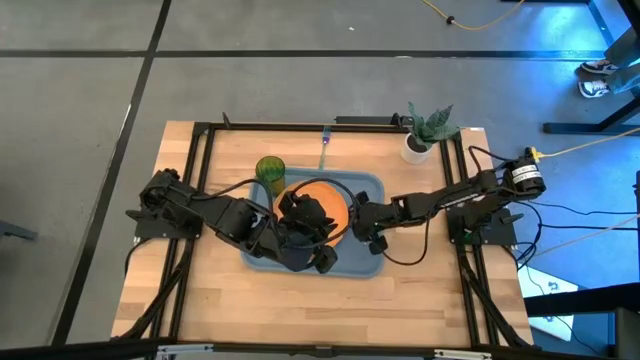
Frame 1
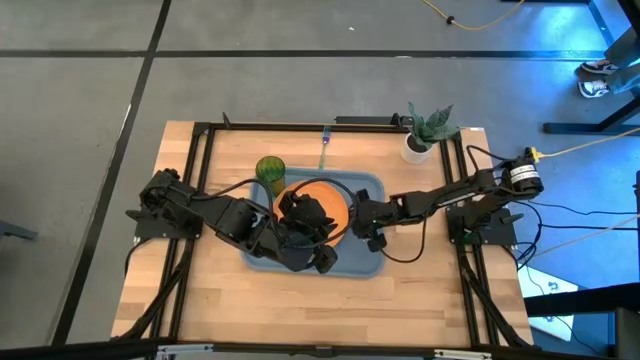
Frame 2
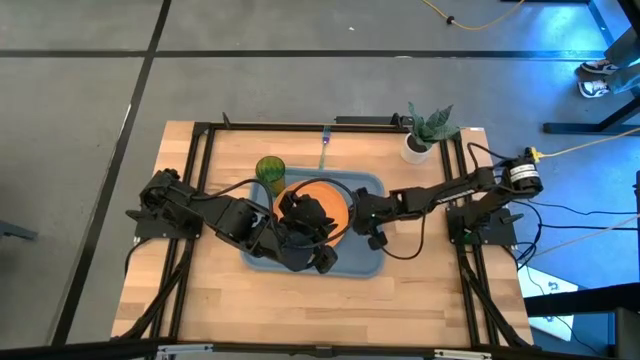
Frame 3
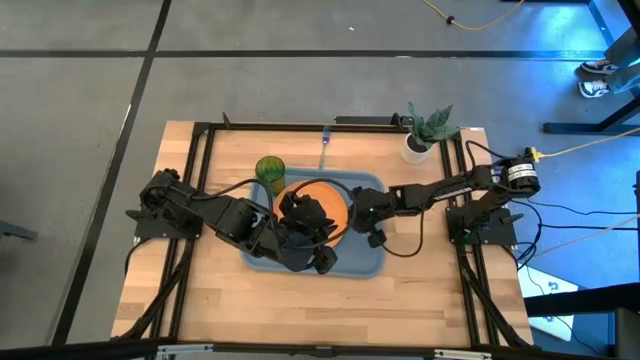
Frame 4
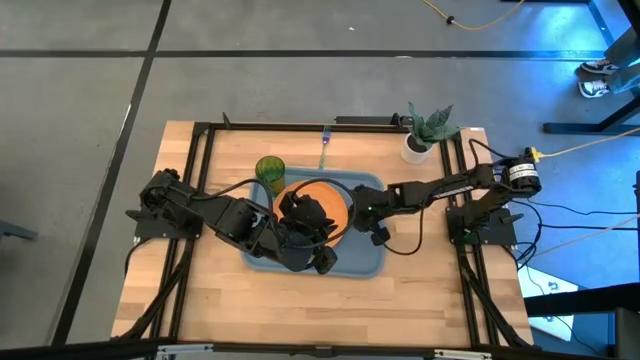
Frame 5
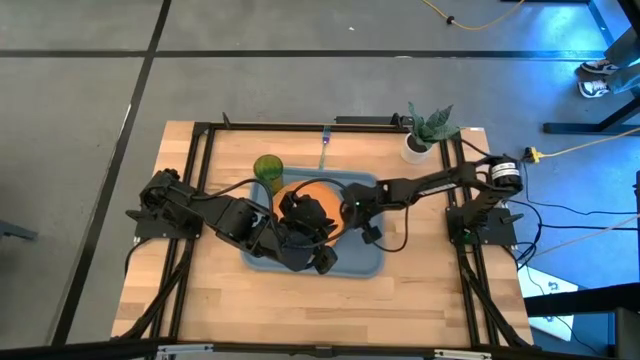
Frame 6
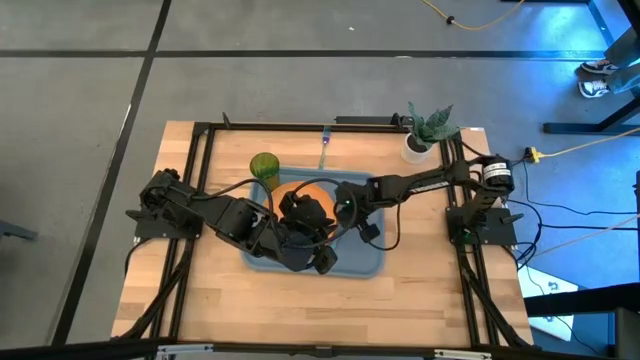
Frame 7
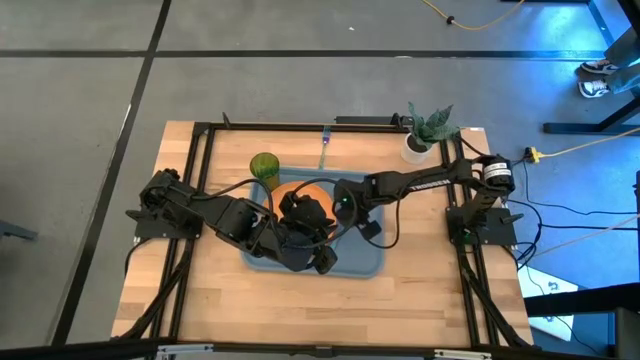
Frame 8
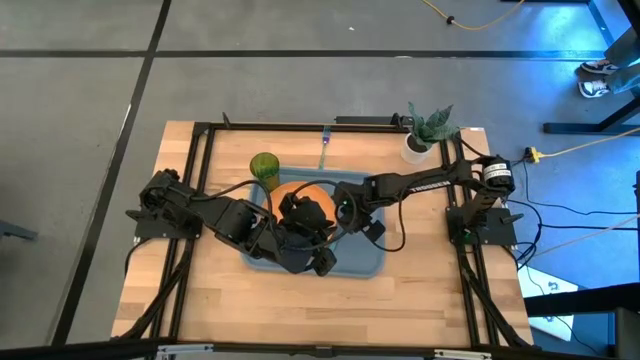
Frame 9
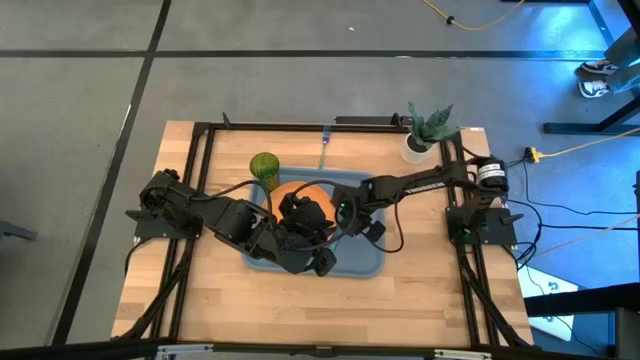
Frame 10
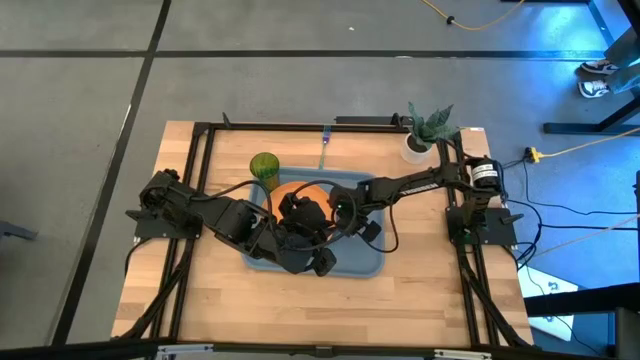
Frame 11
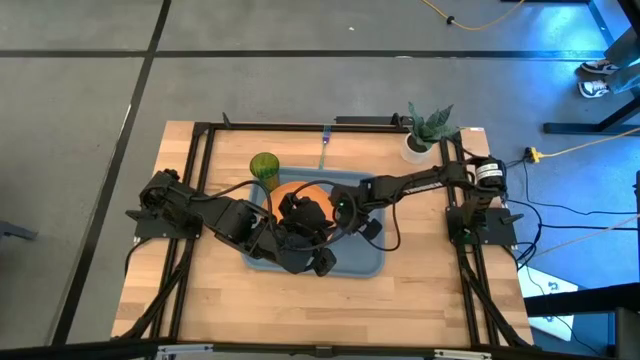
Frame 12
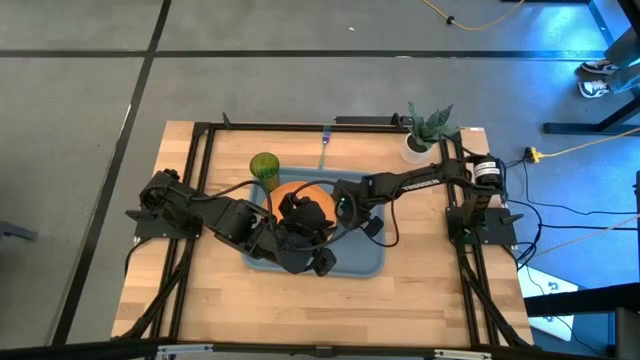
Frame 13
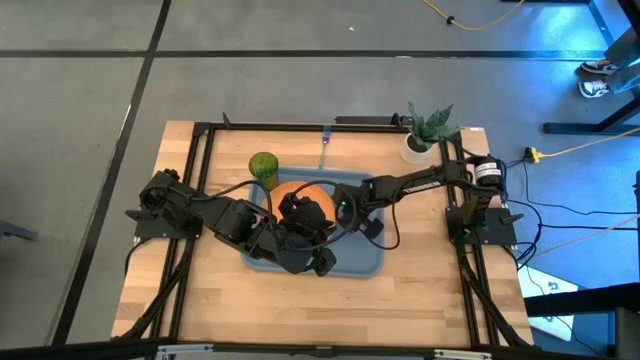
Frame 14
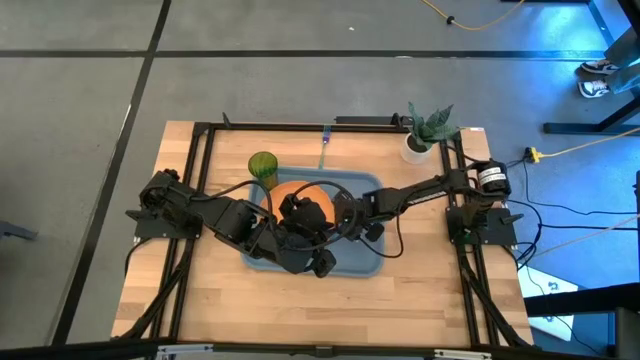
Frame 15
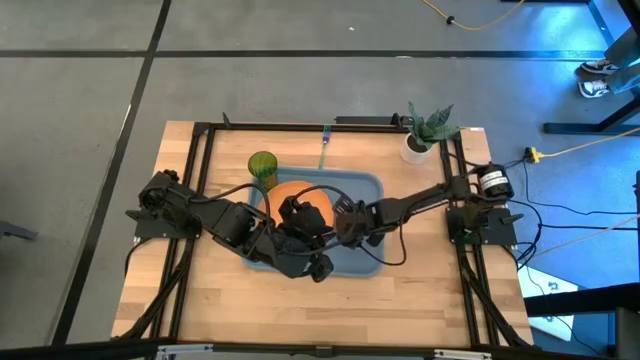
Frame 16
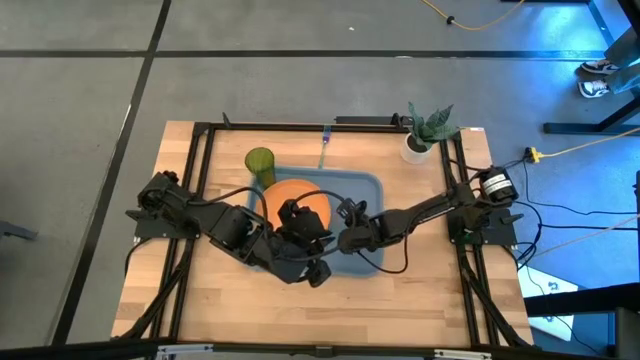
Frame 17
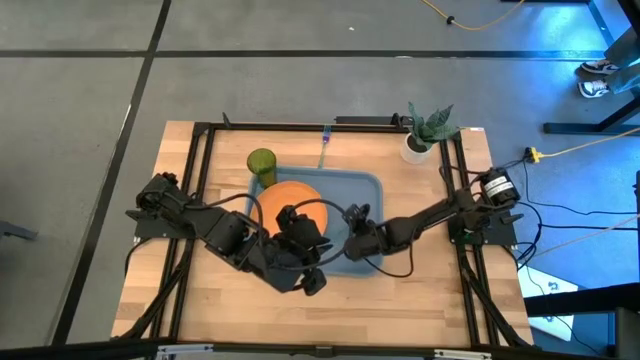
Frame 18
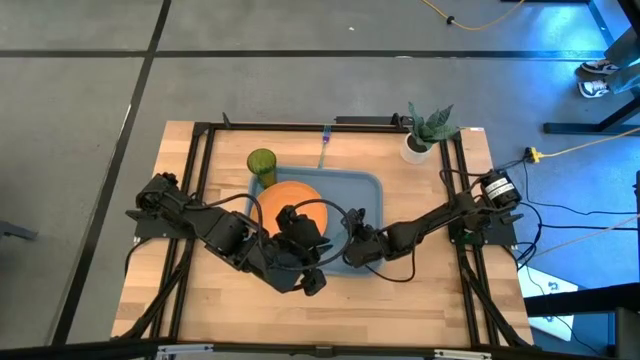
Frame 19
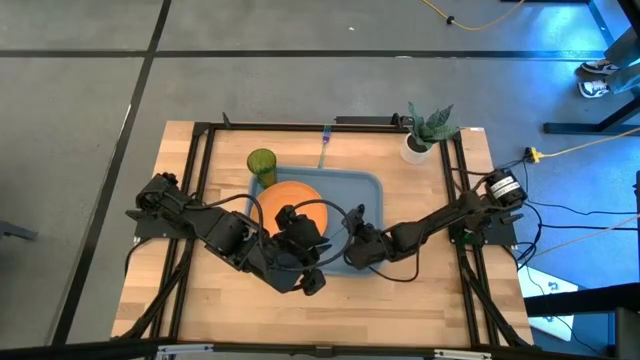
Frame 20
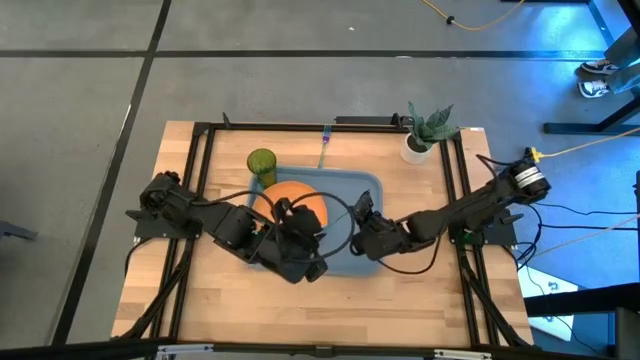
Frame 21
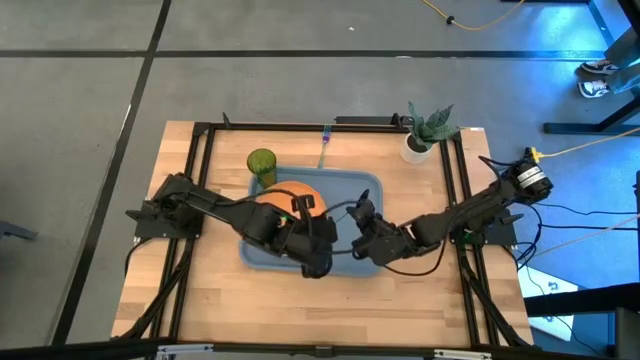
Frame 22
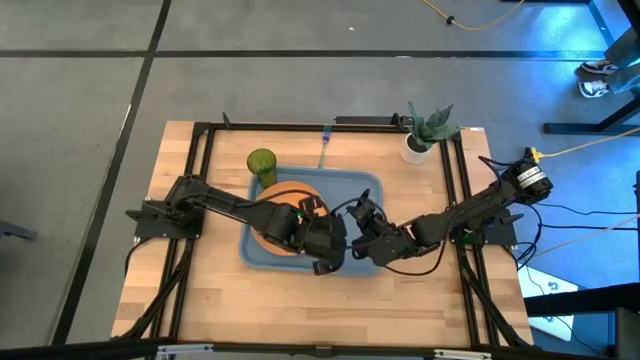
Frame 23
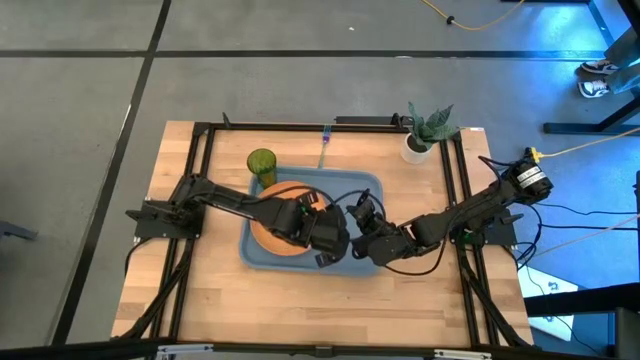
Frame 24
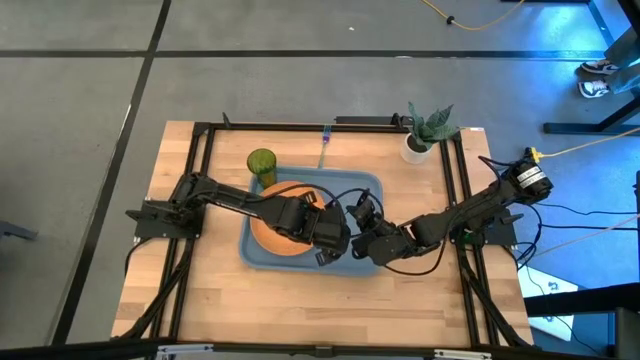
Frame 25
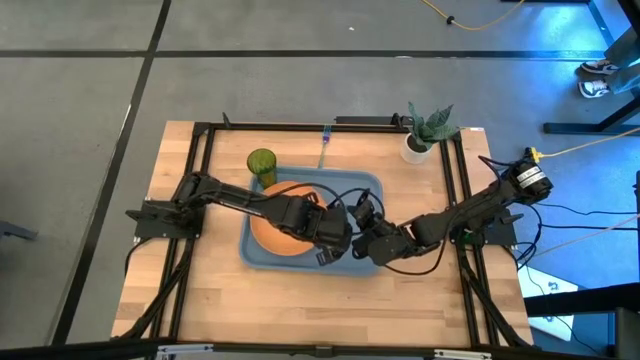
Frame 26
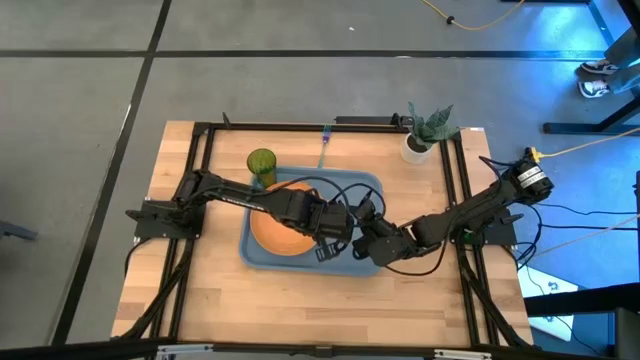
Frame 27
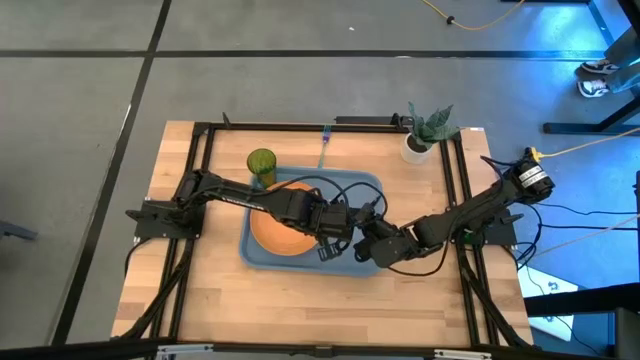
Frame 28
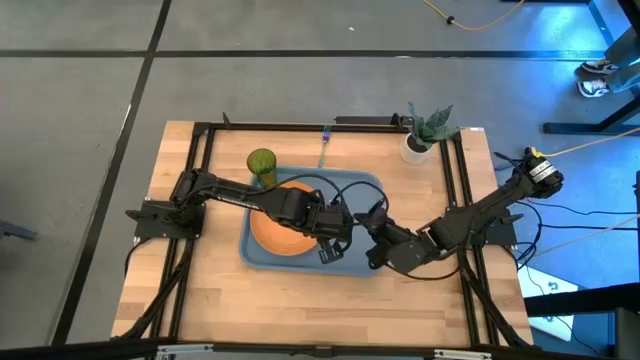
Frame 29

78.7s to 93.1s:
Task: Pick and place plate/cup/fork/spoon on tray
Put the blue spoon on the blue tray to the right of the orange plate

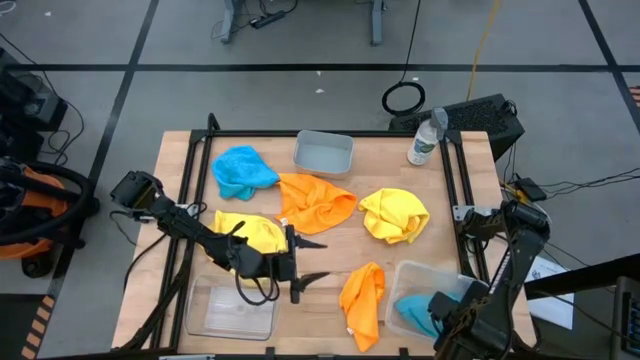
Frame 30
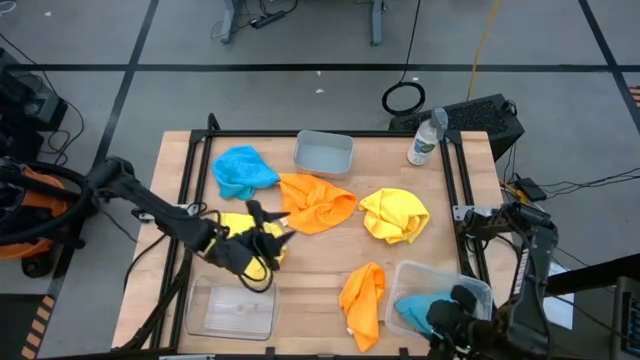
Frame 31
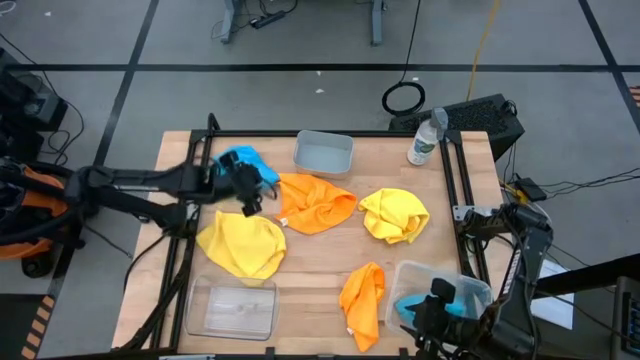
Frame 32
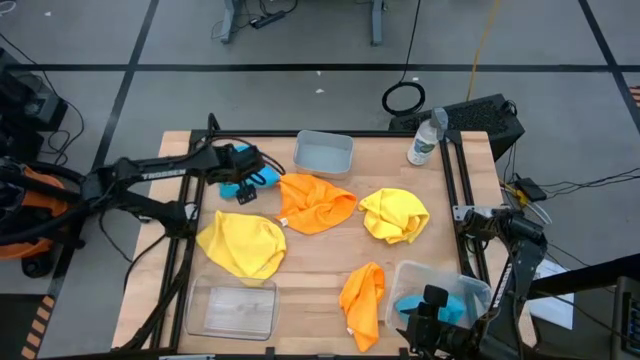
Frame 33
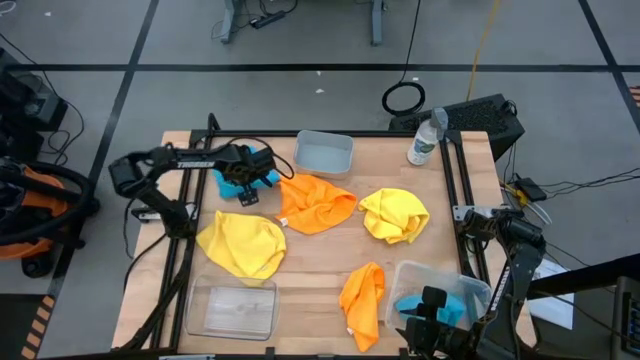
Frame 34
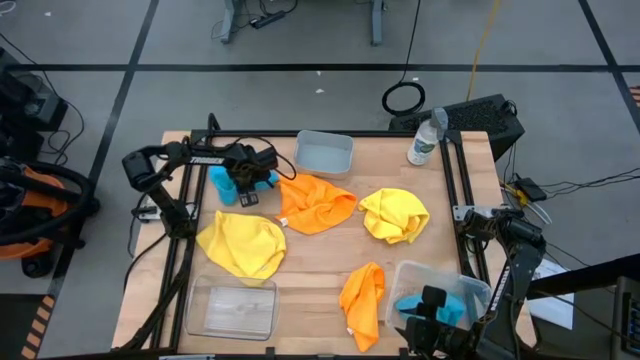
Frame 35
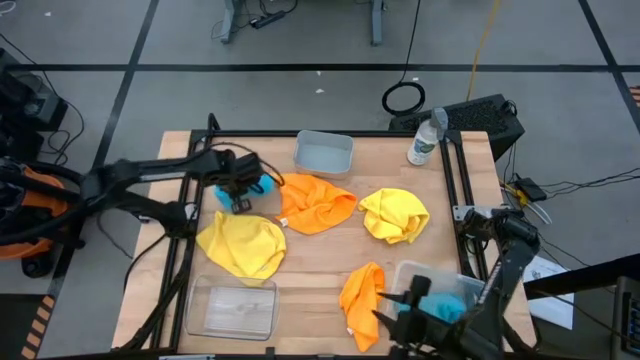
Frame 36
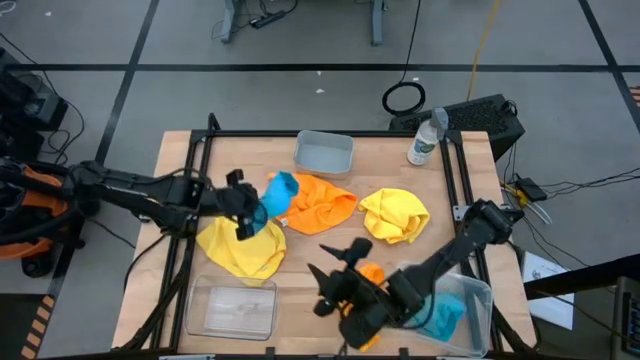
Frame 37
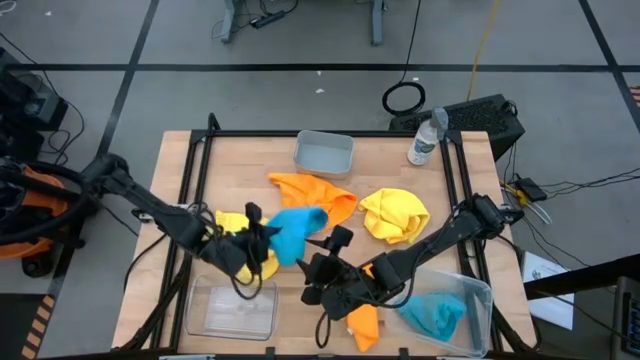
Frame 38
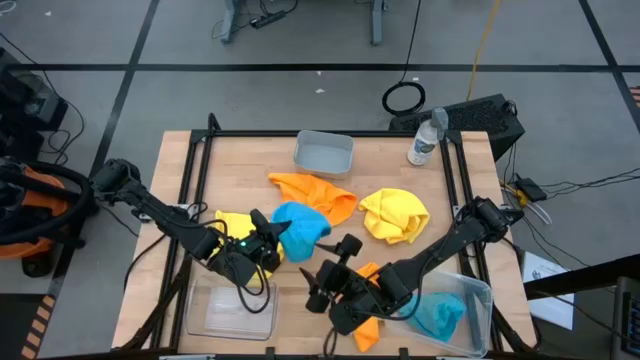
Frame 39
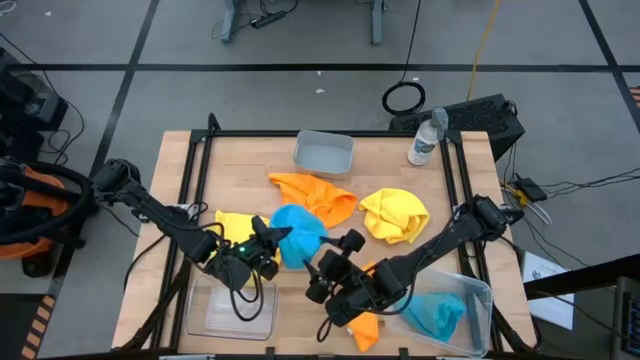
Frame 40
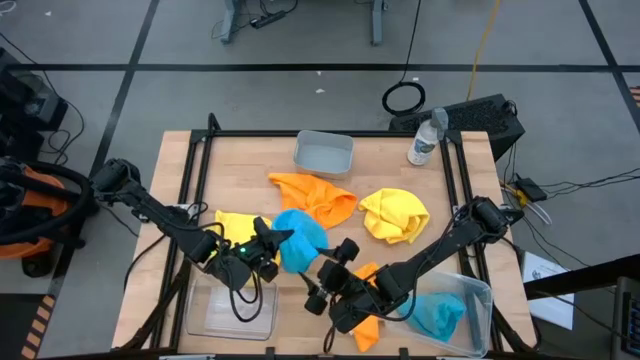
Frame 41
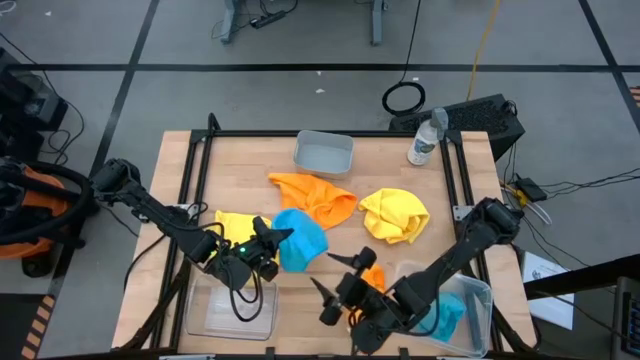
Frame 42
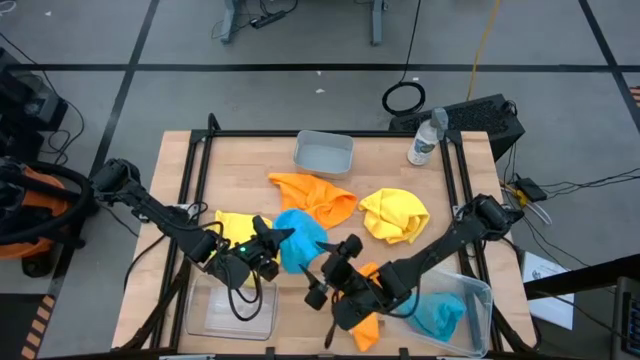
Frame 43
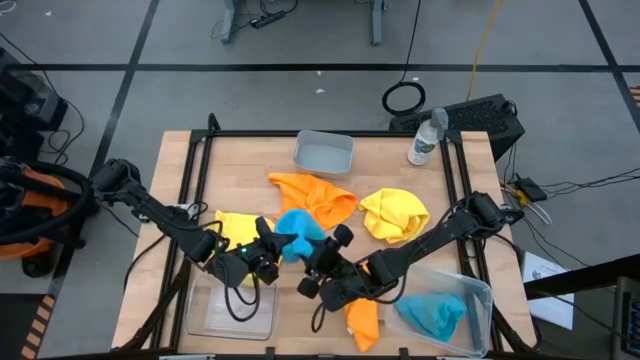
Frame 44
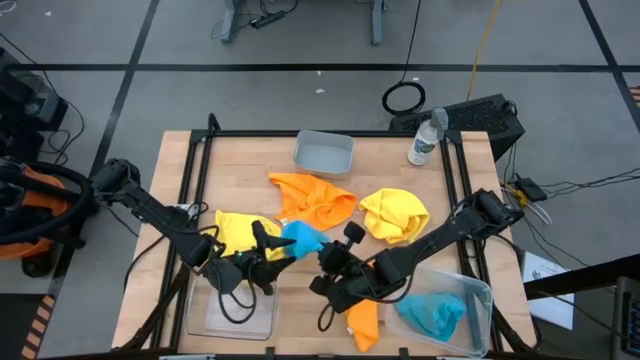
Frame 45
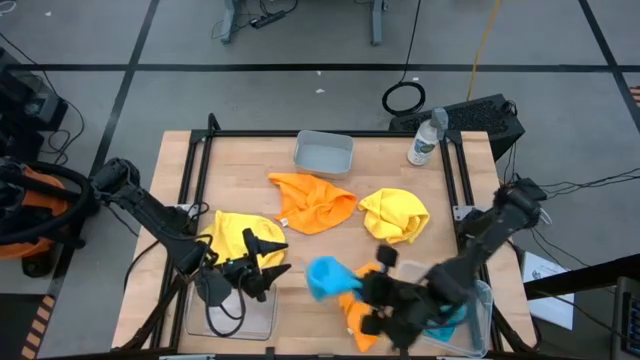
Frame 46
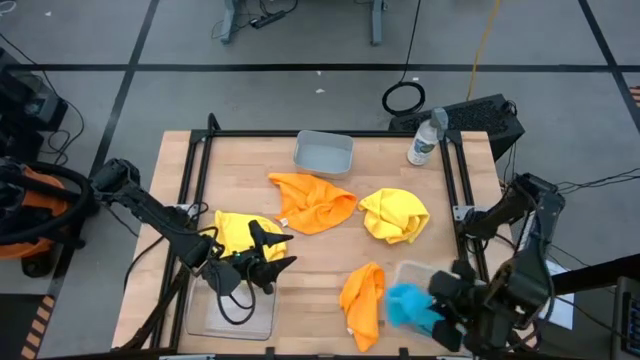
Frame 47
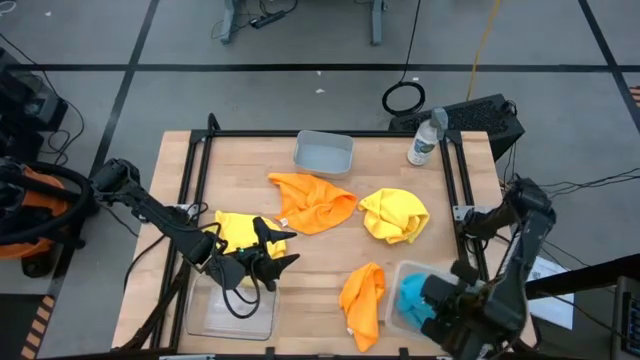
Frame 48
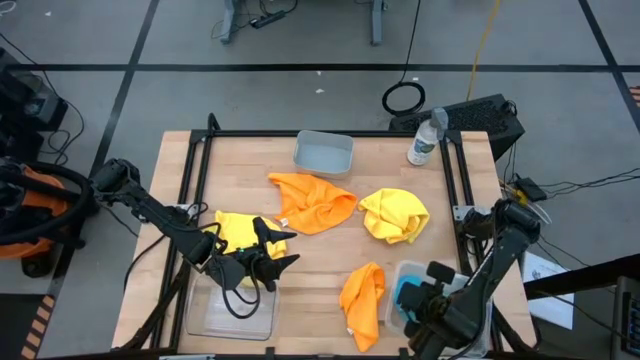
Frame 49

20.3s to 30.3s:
Task: Sort microfiber towel by color & place in baskets
Put the blue microfiber cloth into the right transparent bin
